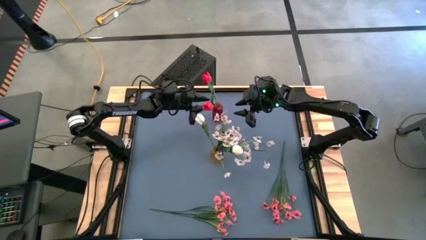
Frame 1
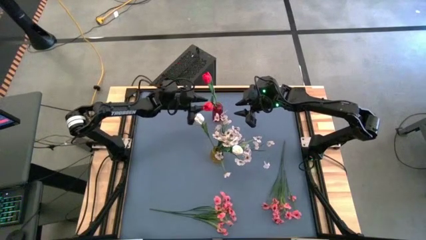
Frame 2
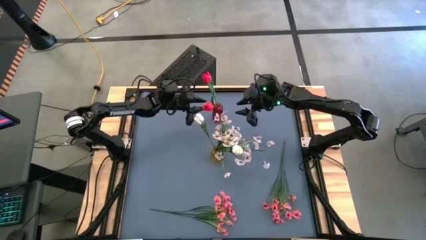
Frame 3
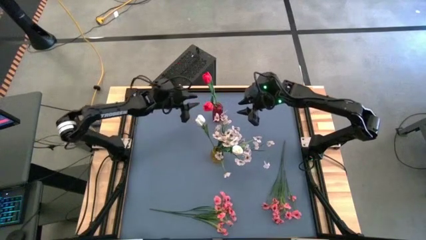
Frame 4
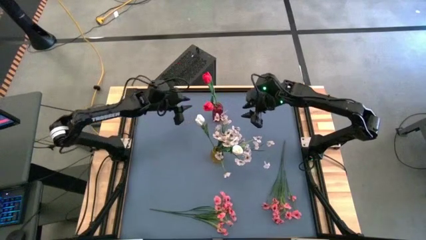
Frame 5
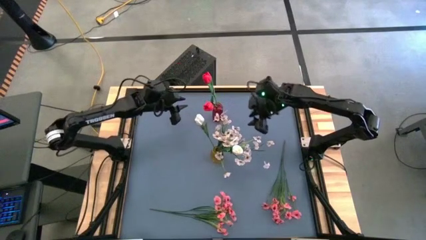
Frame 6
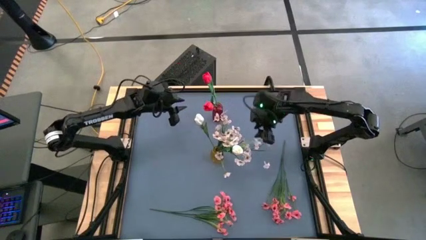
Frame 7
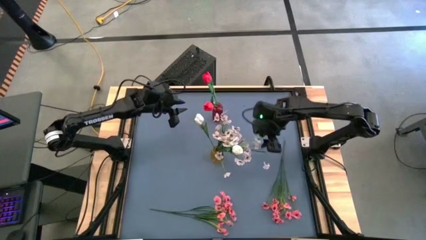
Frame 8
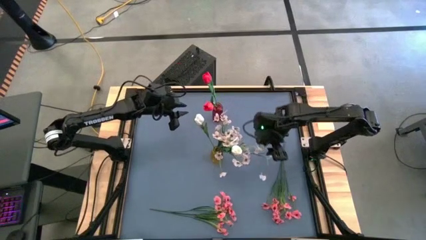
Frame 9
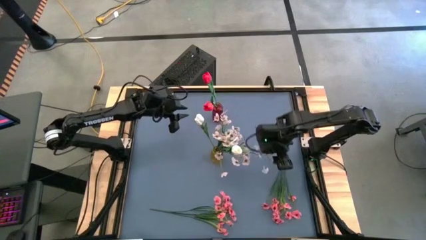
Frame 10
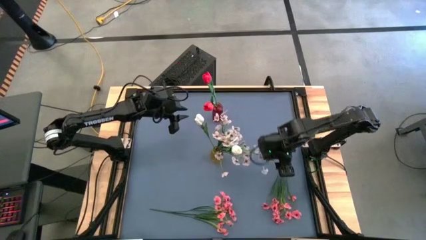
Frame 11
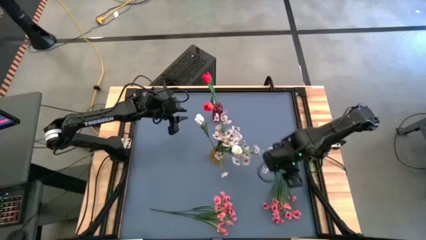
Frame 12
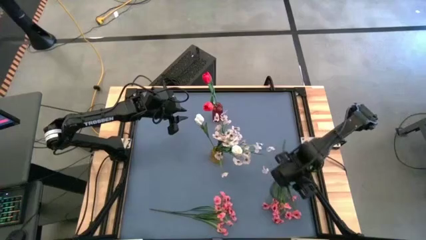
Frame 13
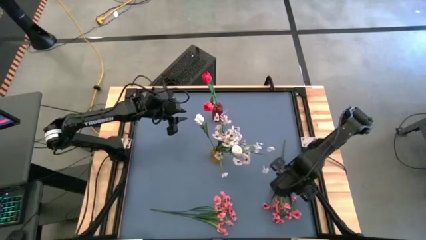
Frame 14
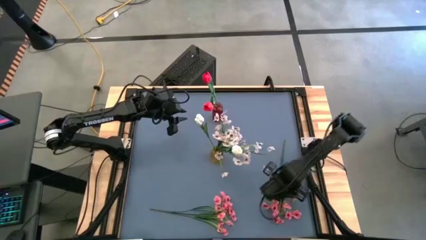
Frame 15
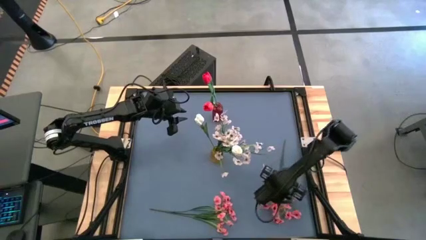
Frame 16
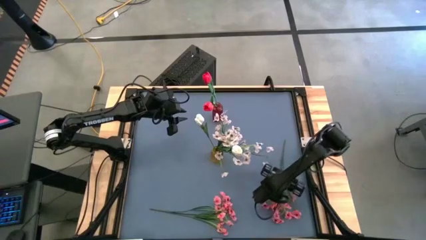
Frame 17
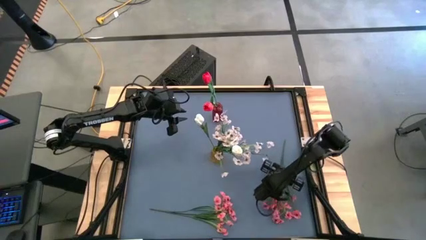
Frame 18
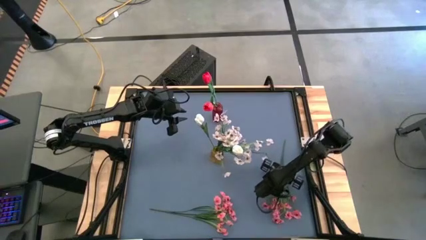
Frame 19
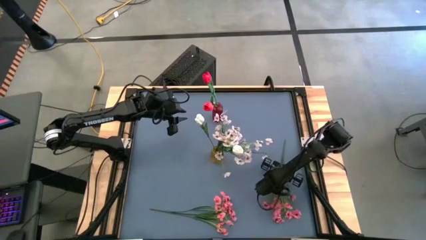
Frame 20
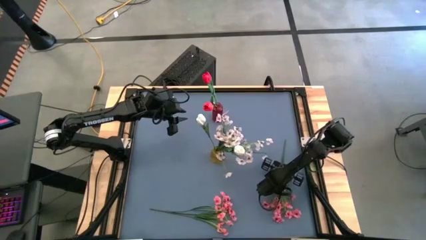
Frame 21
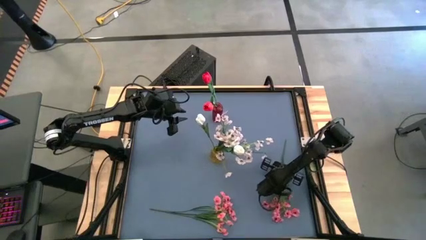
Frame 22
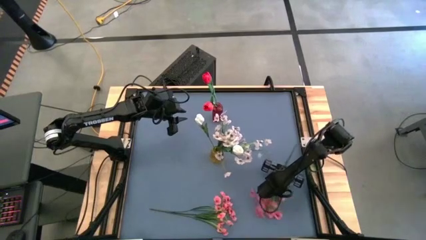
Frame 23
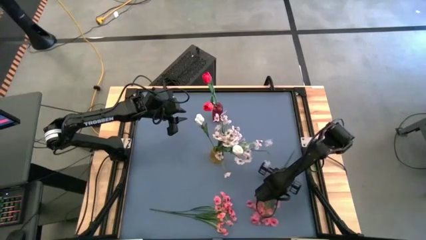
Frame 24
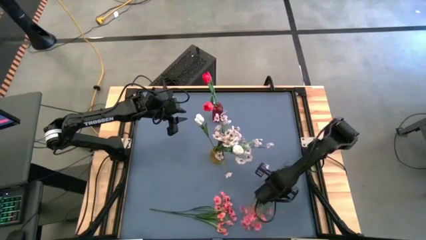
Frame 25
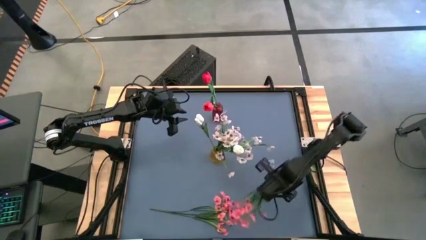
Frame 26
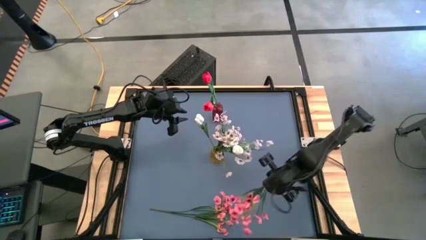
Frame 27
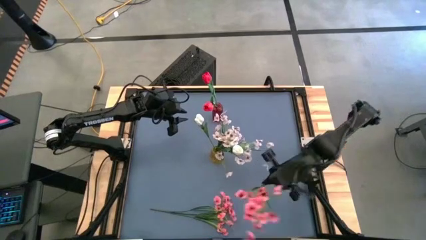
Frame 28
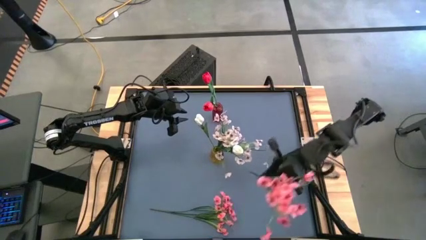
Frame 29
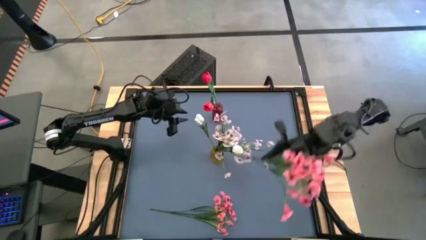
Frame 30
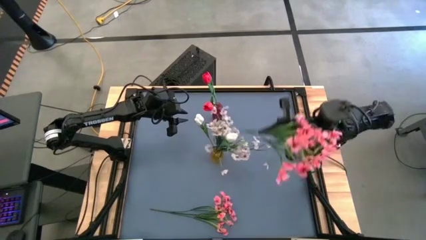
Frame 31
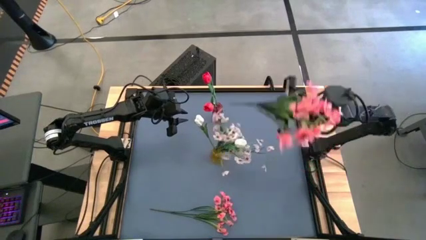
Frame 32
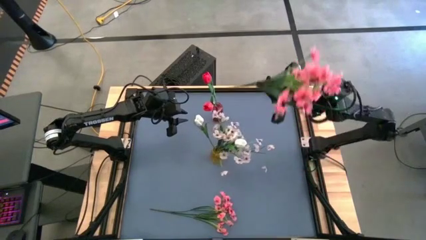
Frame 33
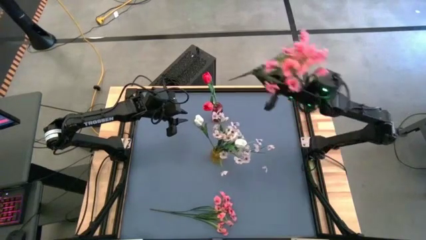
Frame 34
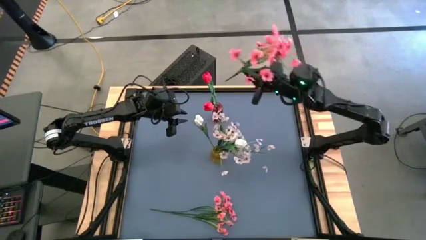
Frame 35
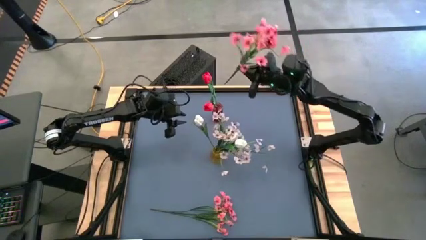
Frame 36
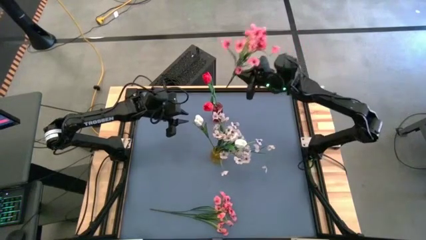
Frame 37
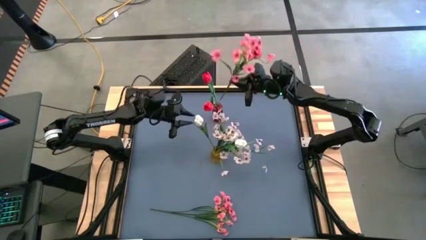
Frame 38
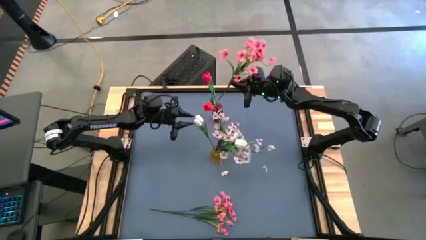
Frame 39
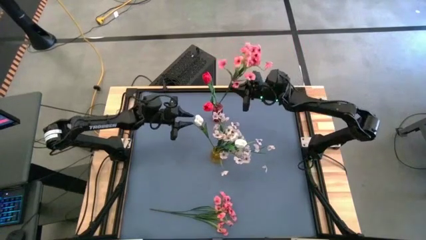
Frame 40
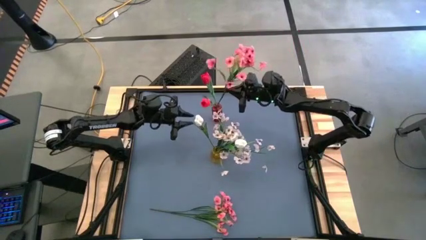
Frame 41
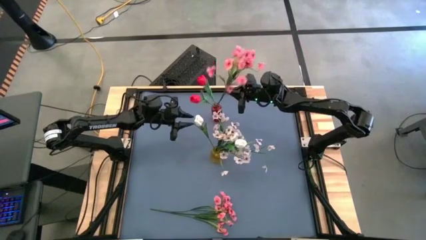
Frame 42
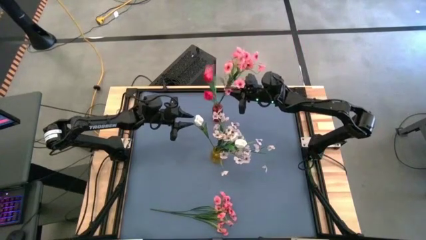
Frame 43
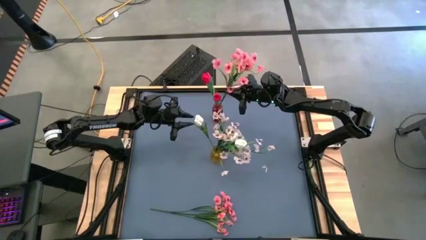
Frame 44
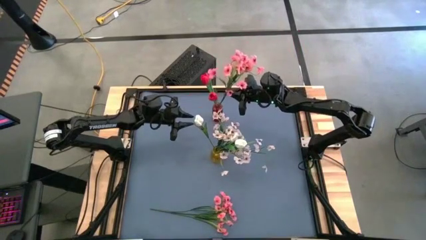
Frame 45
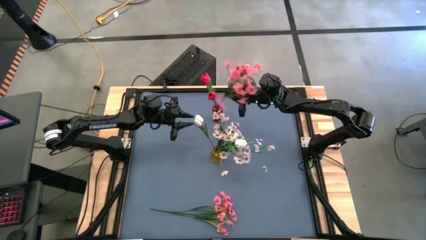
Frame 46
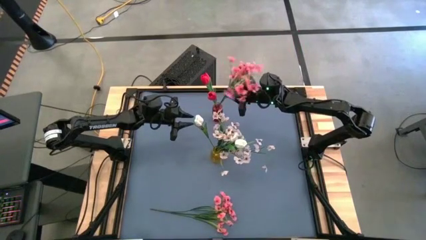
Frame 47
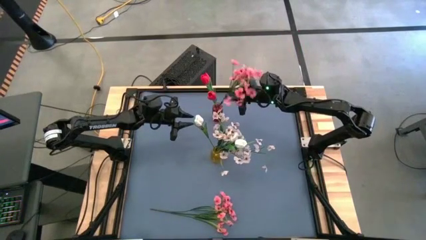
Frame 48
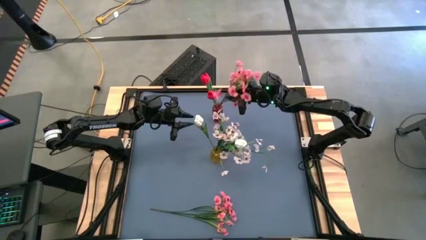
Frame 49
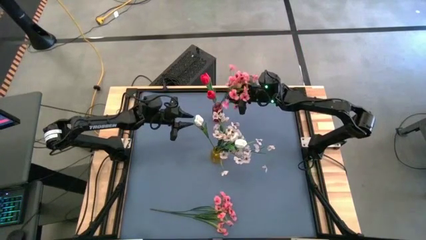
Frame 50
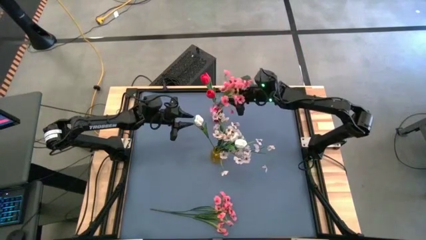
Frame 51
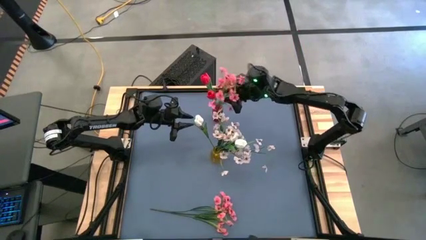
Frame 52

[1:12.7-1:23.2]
Task: Sort flowers into vase by color
Put the right pink flowers into the red flower vase

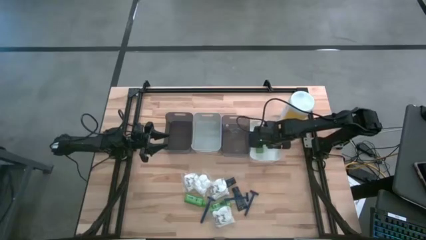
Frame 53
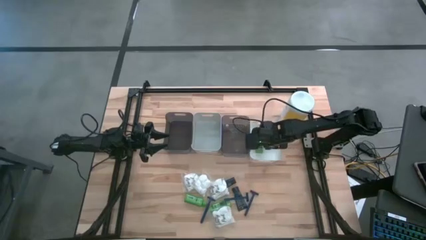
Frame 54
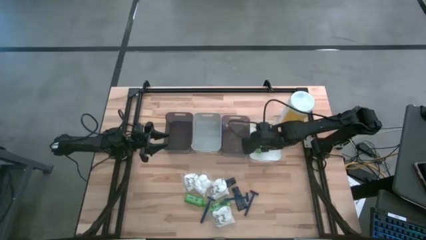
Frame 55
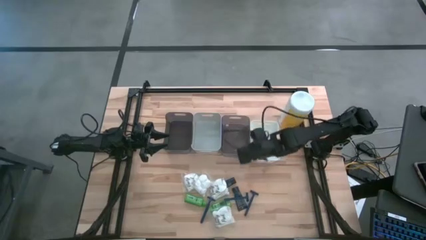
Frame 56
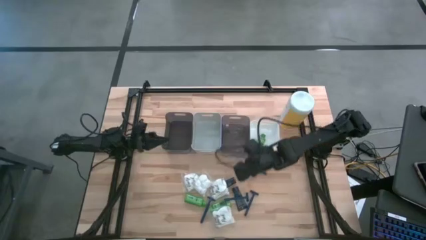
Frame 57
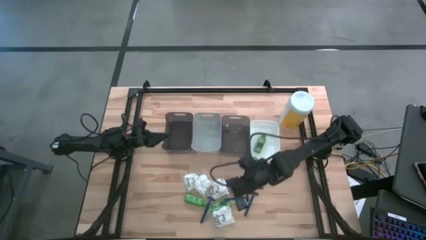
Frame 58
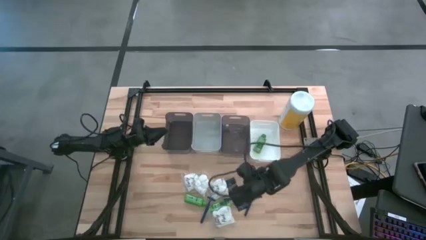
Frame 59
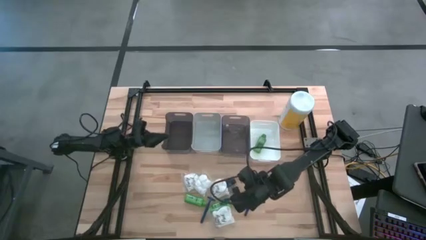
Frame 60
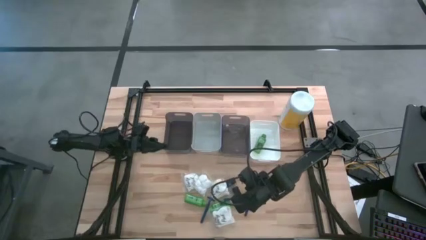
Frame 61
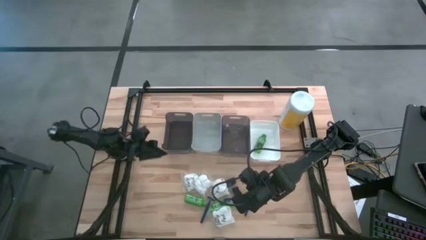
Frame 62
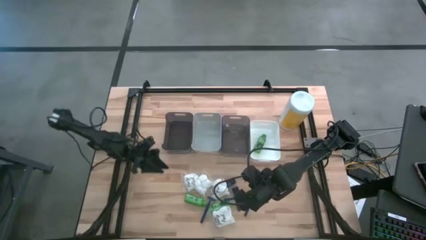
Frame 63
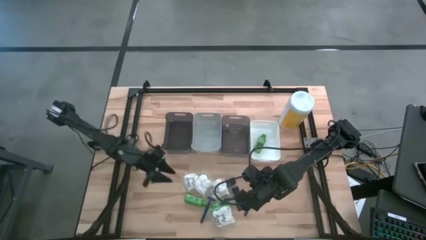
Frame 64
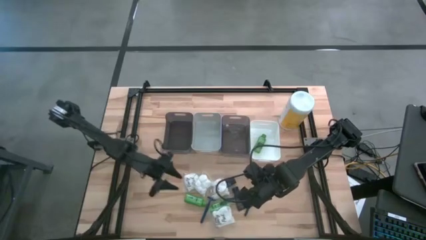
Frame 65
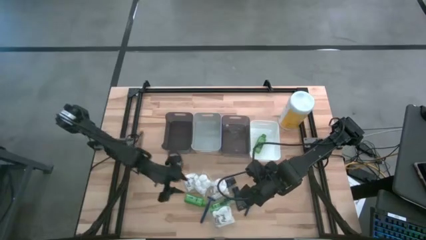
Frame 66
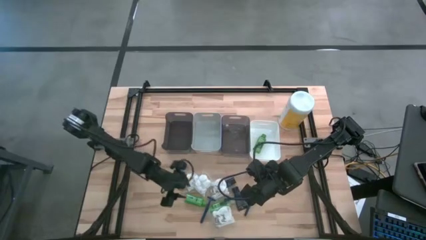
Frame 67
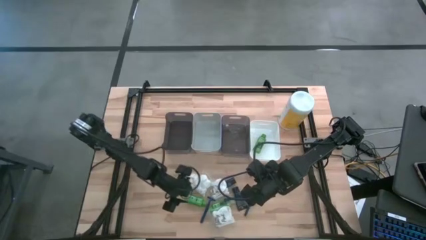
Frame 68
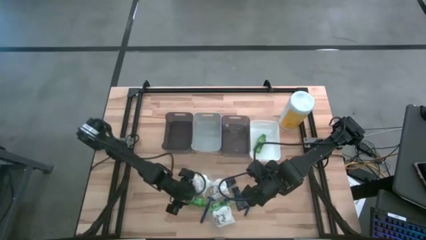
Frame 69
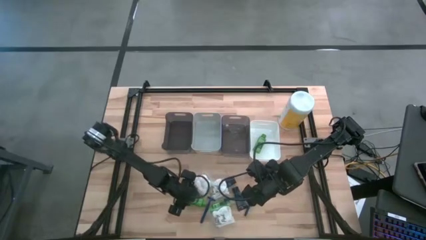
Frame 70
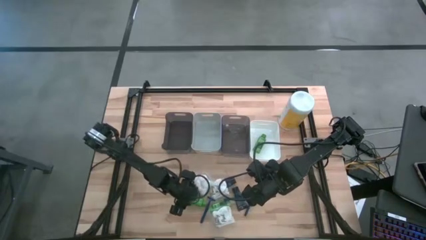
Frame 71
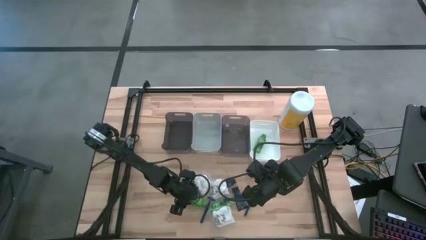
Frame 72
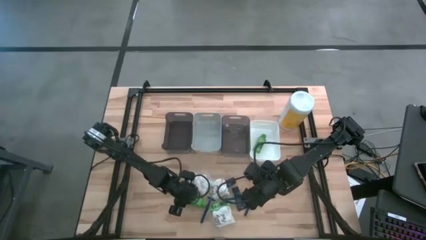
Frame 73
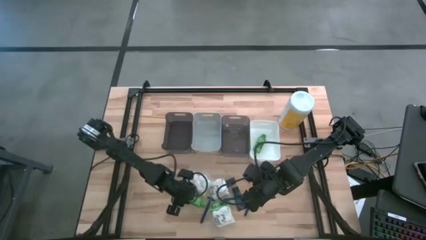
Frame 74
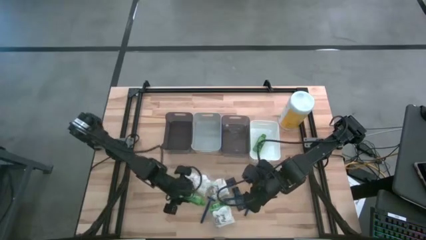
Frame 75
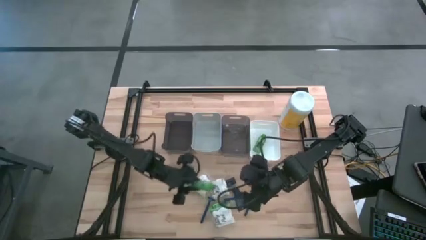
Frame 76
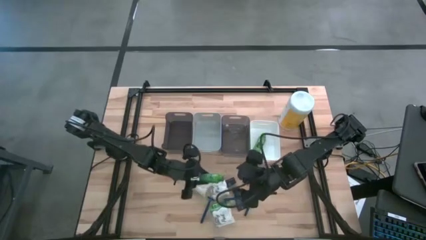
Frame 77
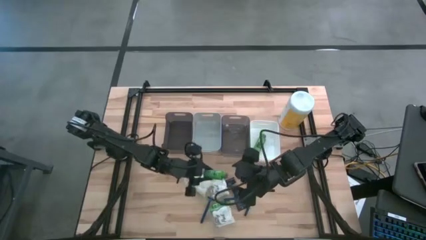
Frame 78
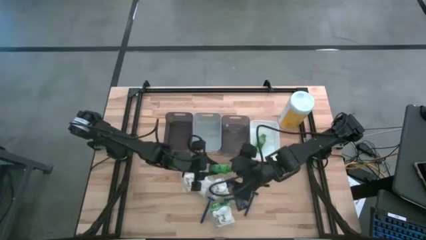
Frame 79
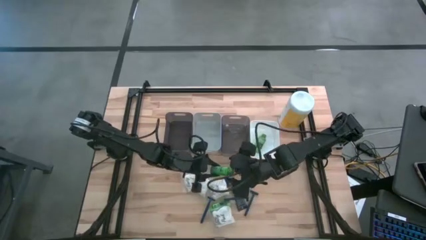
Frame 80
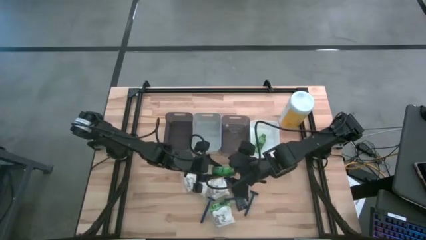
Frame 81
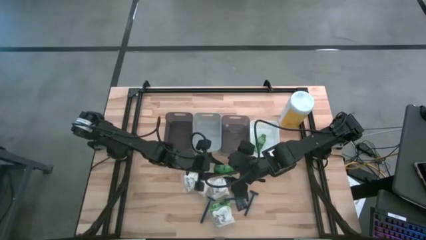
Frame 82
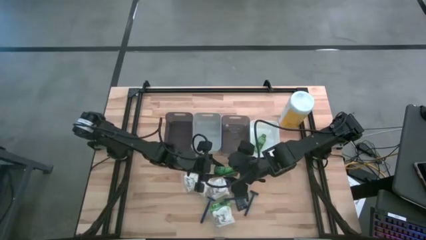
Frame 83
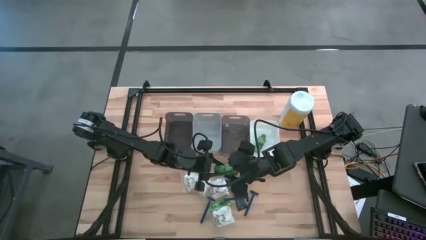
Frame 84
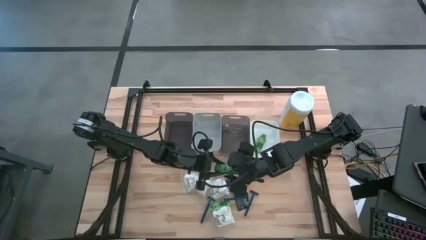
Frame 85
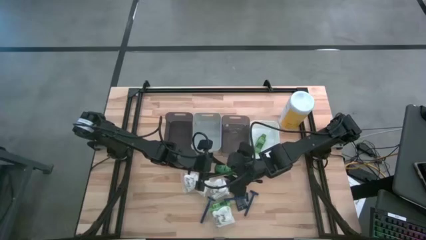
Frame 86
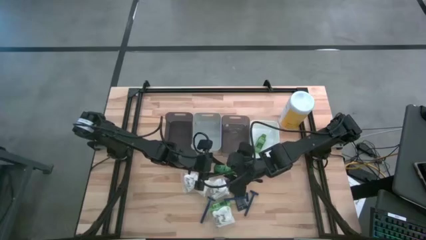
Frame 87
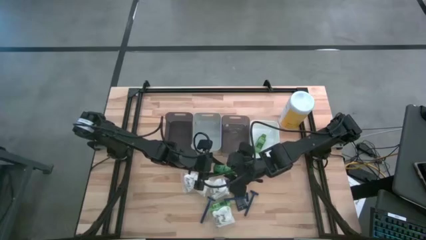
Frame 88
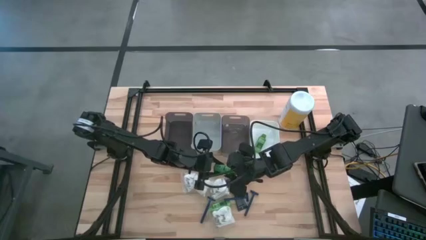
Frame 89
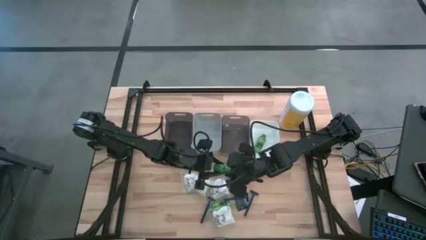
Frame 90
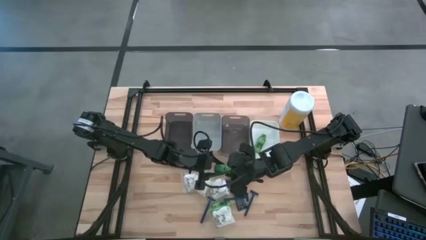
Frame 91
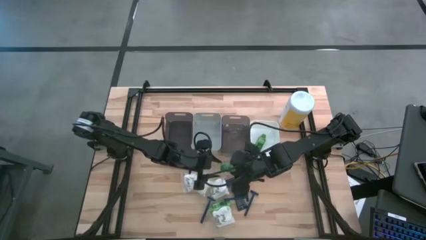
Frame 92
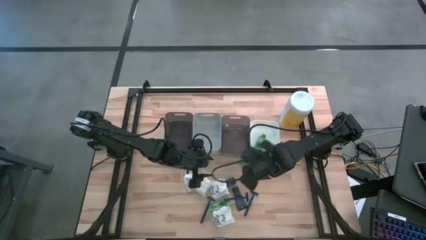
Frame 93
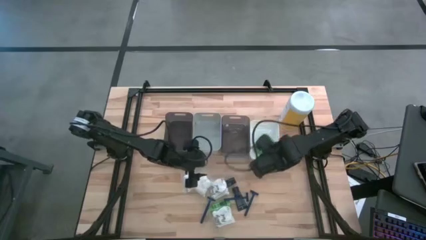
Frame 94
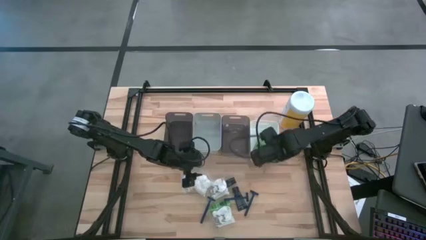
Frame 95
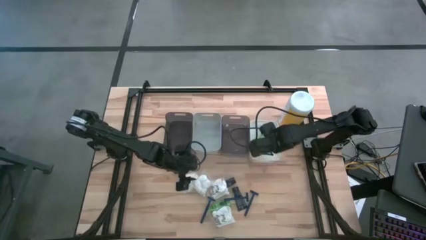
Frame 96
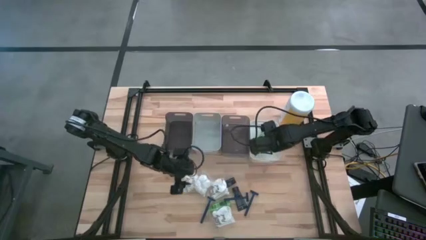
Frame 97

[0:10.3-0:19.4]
Task: Pick & Place Travel size toiletries
Put the green shampoo into the white bin
